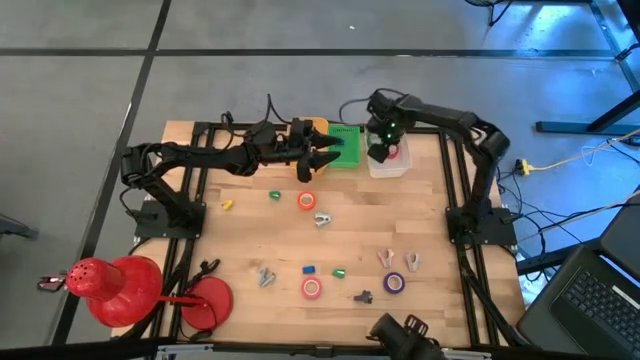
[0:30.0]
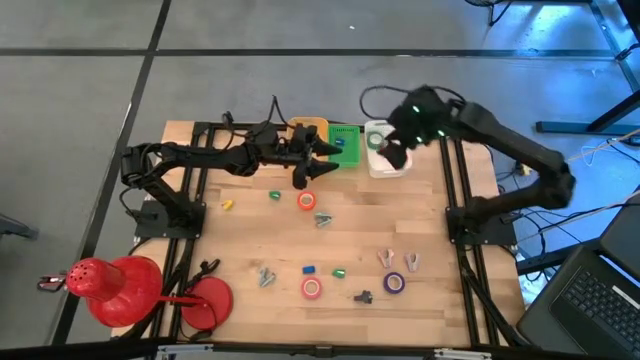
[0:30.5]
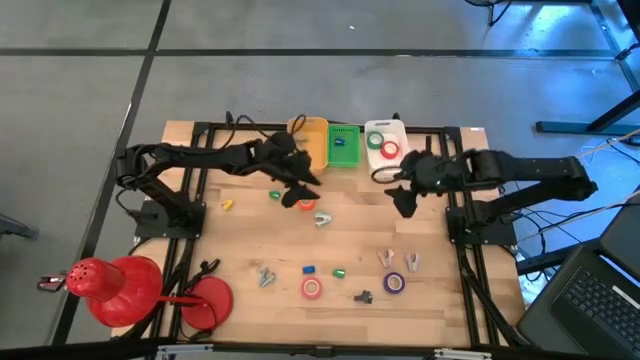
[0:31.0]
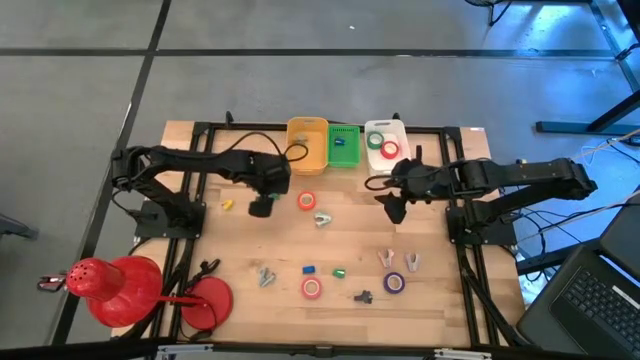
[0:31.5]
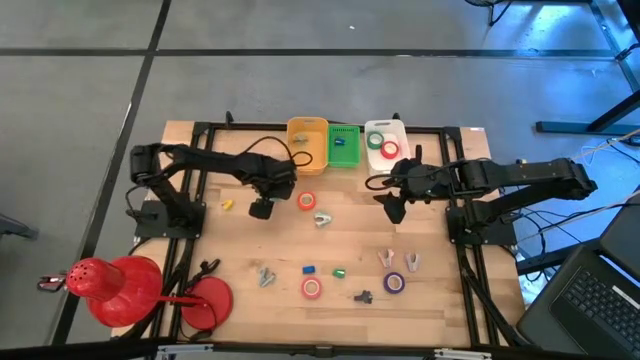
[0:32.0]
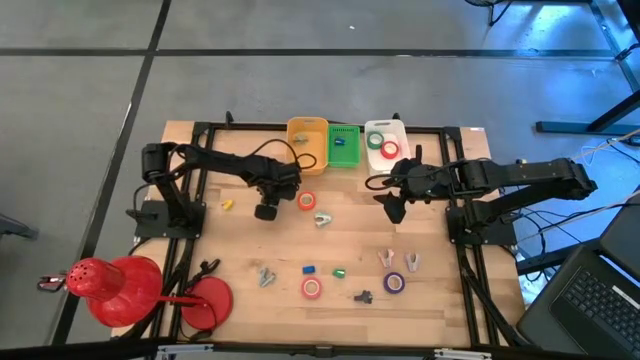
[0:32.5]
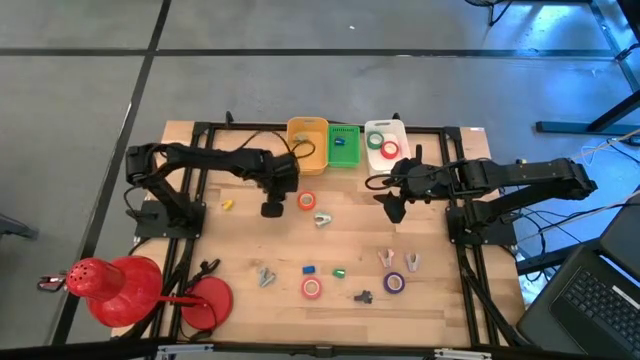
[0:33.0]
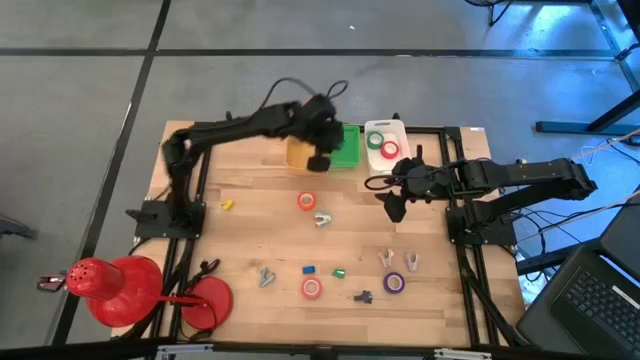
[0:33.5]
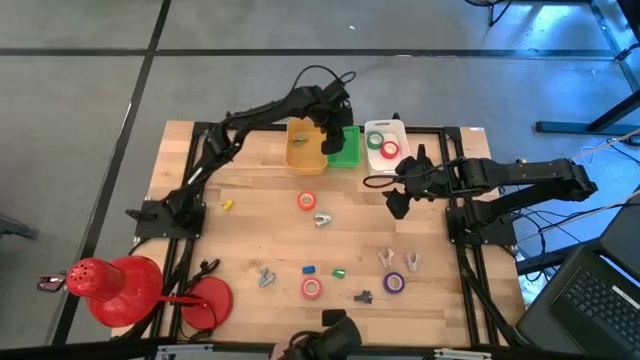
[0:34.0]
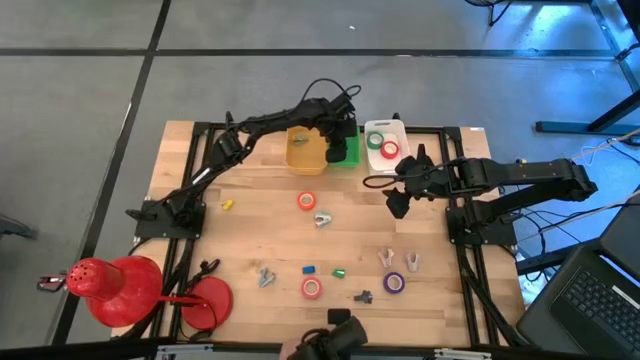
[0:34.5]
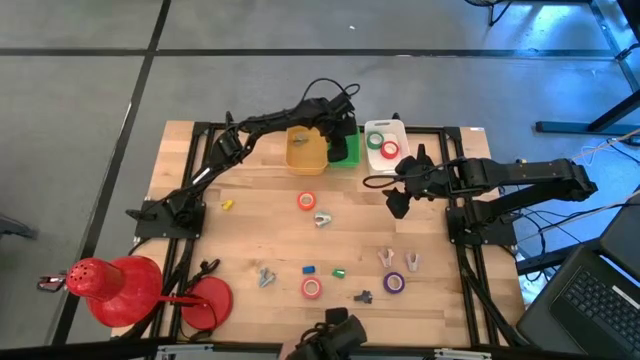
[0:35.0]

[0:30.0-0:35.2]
Task: Pick and place Stapler, Stapler remover, tape
Put the left green stapler into the green bin

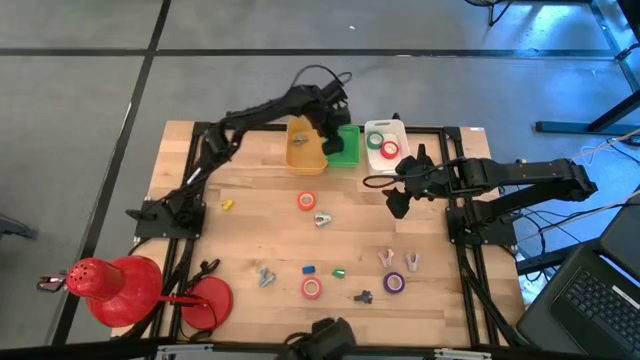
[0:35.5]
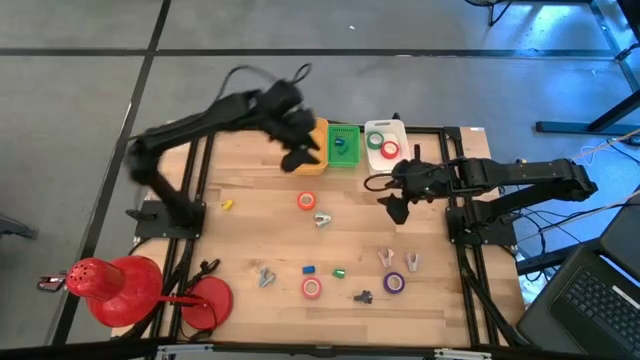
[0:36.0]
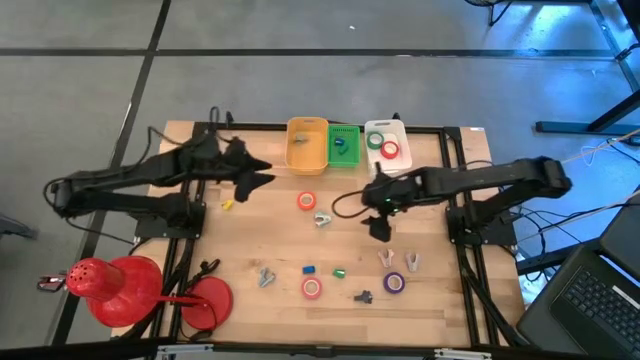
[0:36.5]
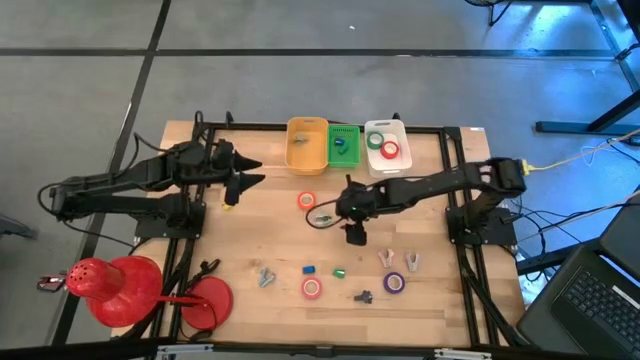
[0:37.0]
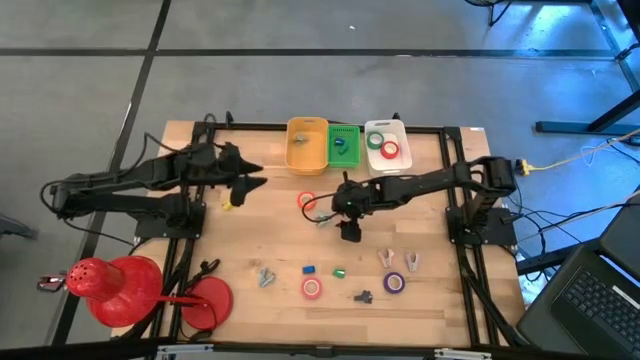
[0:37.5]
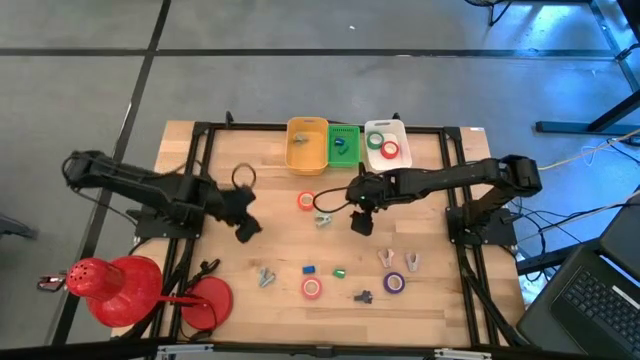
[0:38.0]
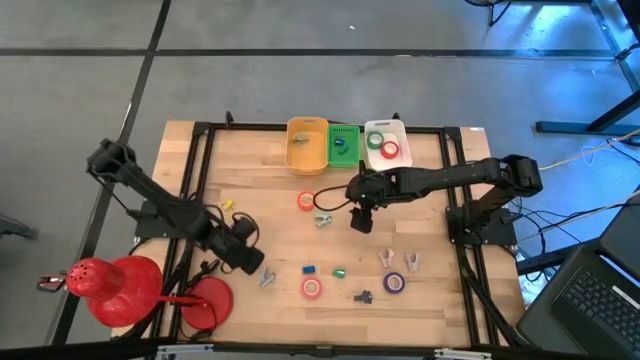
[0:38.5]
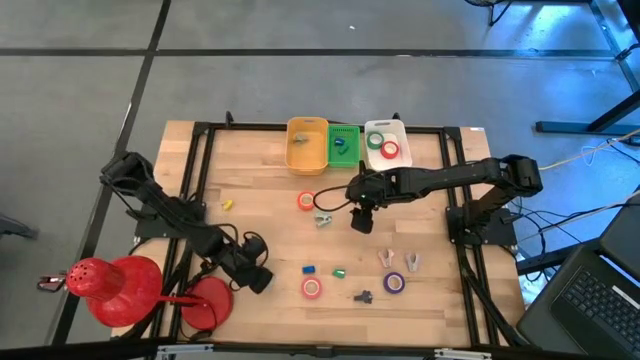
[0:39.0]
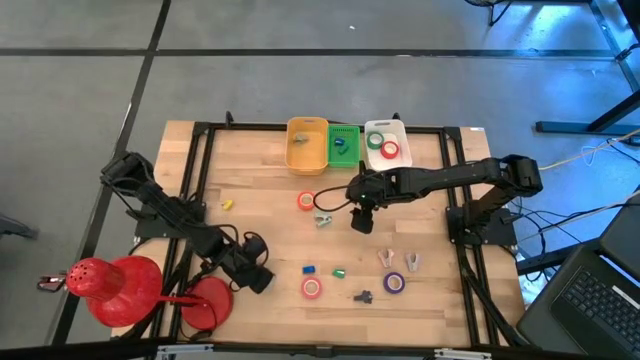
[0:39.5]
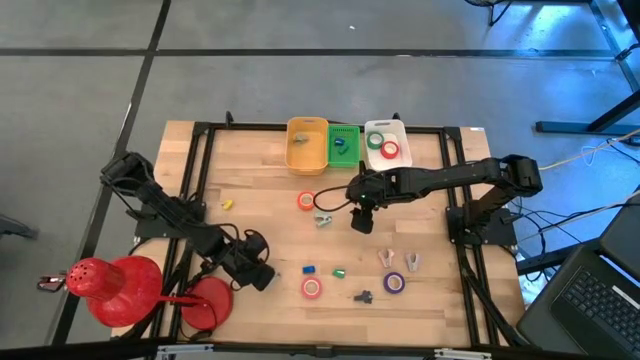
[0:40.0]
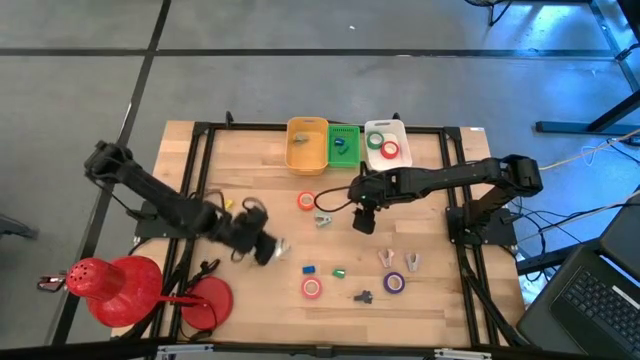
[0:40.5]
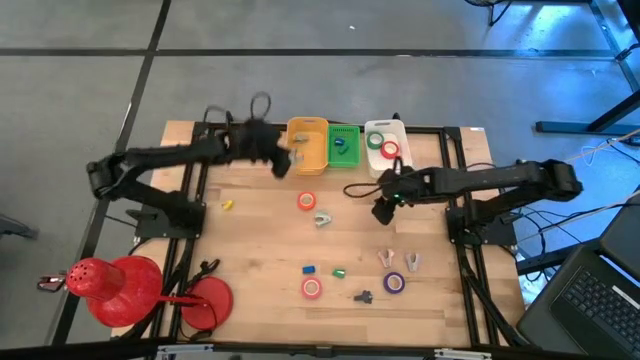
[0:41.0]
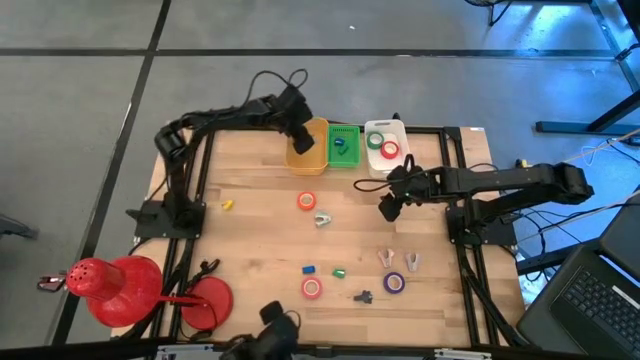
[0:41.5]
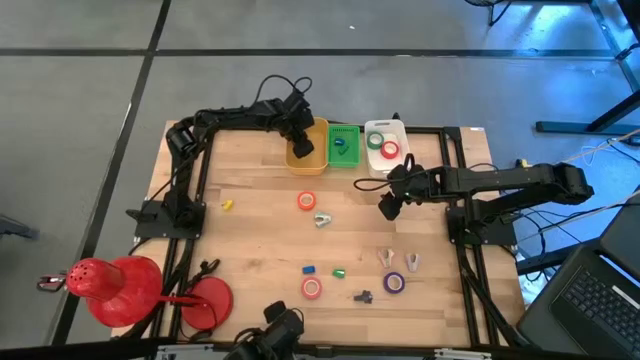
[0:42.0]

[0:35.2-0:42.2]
Put the gray staple remover into the yellow bin

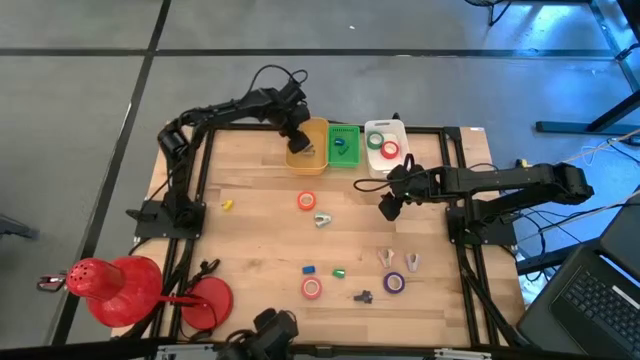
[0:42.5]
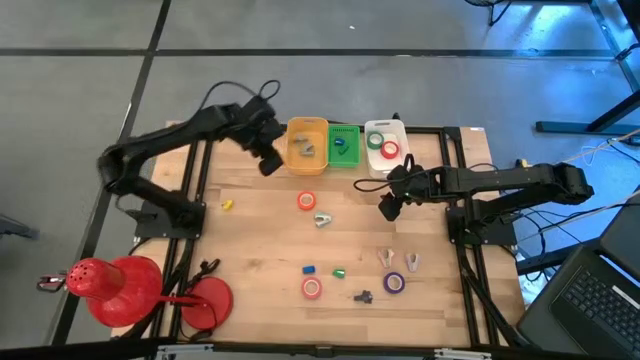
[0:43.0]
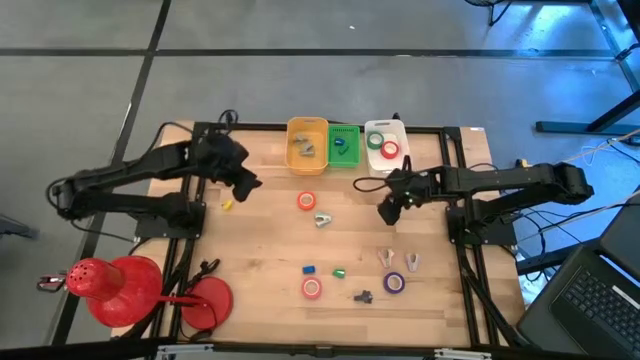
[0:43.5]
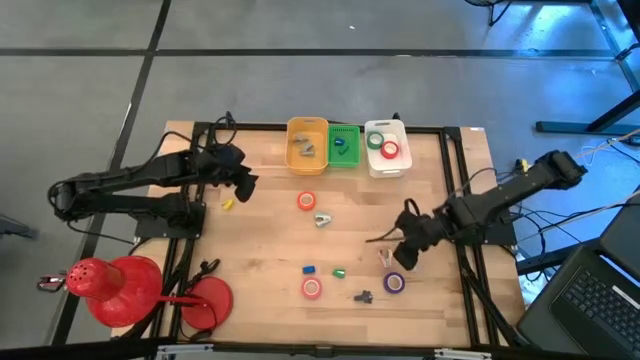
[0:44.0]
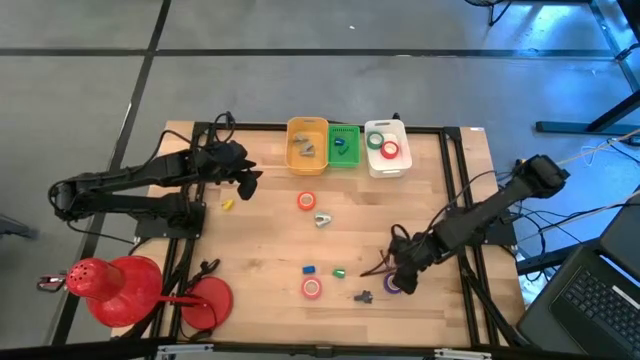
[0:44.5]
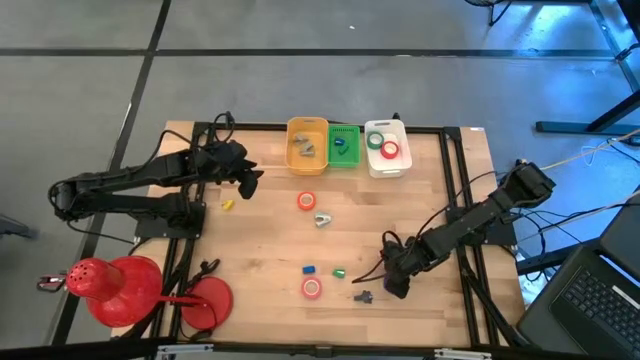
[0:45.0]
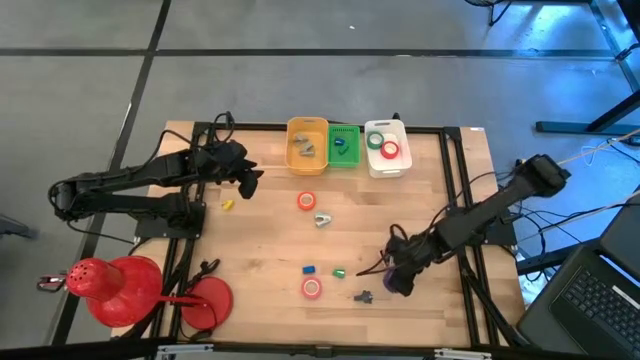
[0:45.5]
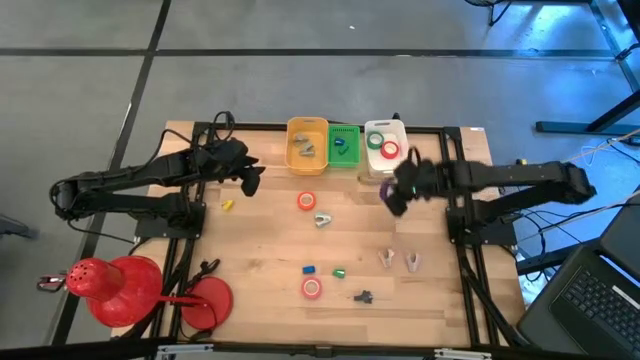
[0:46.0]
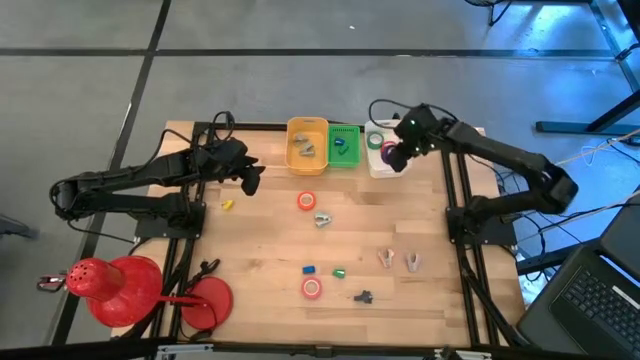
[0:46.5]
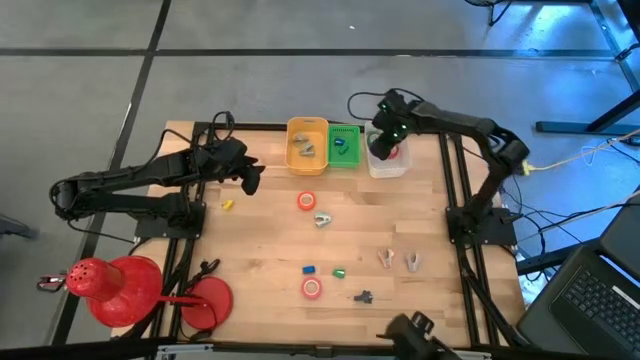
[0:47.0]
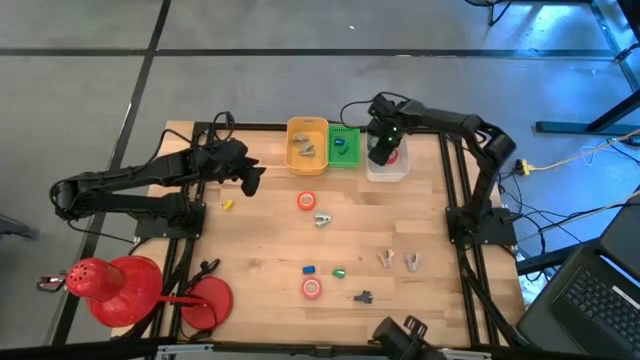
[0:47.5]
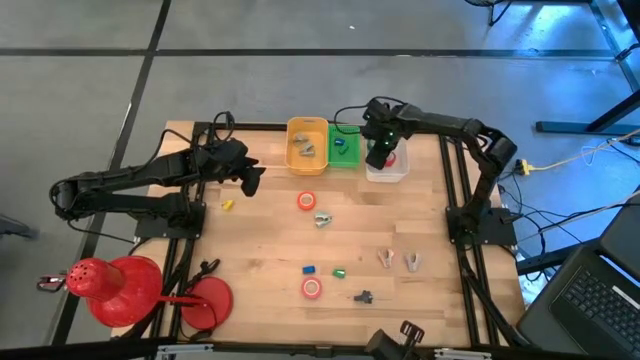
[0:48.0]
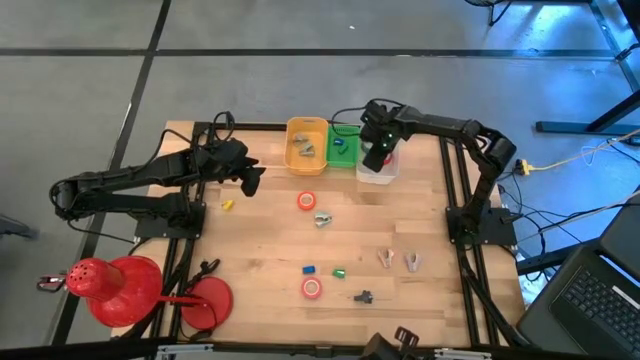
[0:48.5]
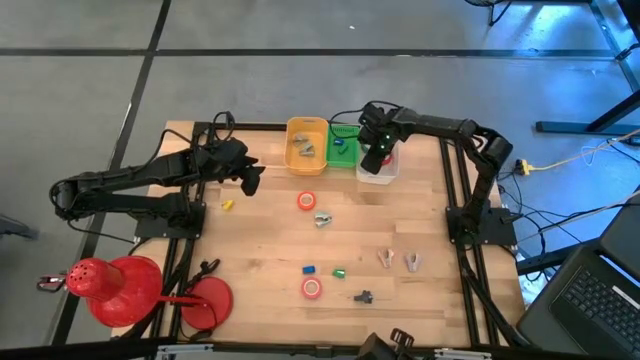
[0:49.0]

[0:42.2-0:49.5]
Put the blue tape into the white bin

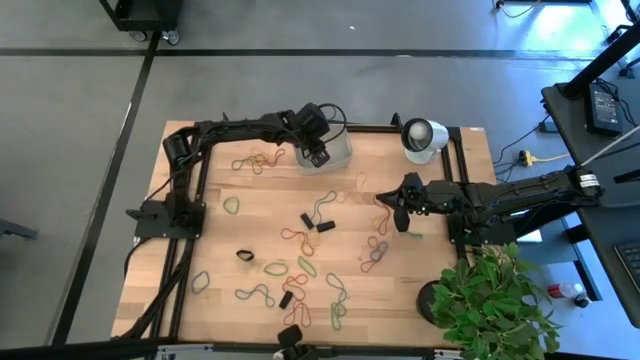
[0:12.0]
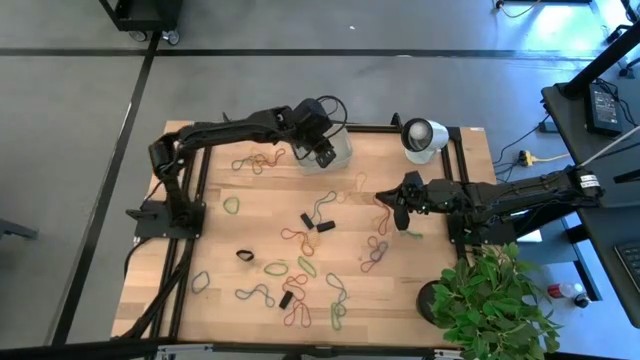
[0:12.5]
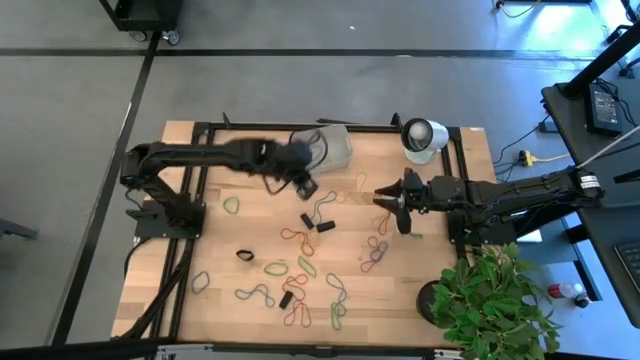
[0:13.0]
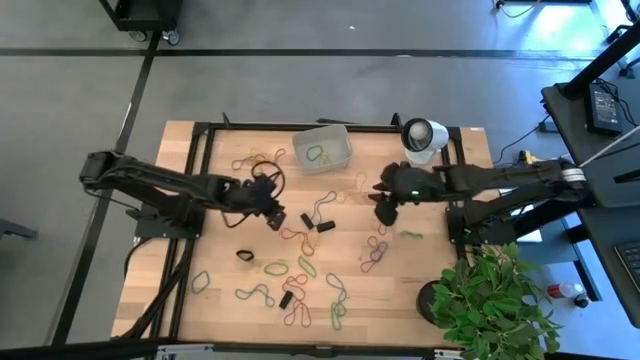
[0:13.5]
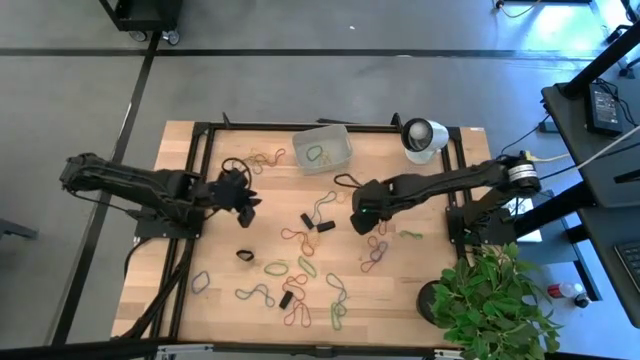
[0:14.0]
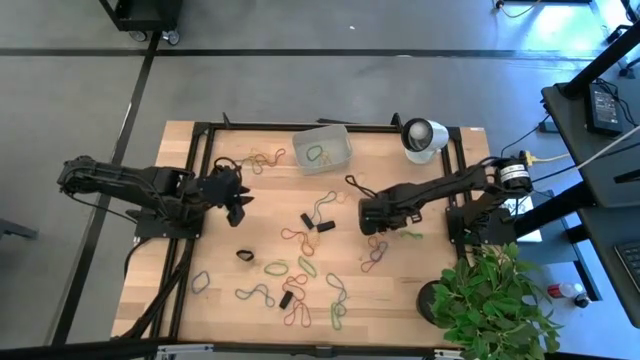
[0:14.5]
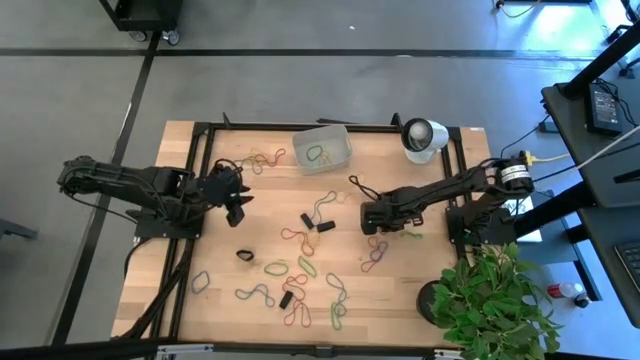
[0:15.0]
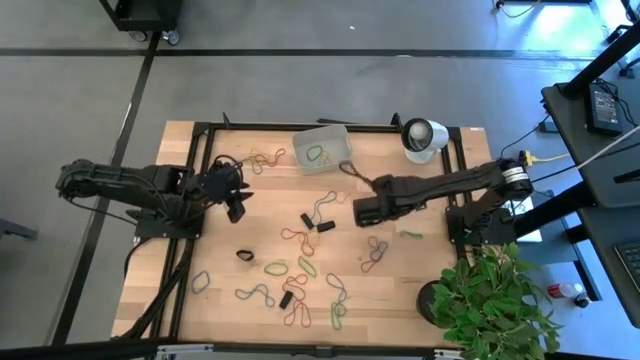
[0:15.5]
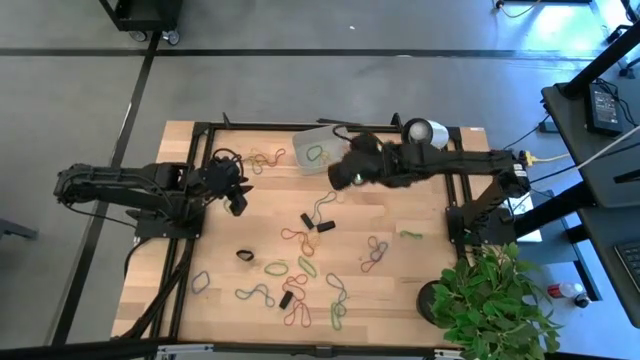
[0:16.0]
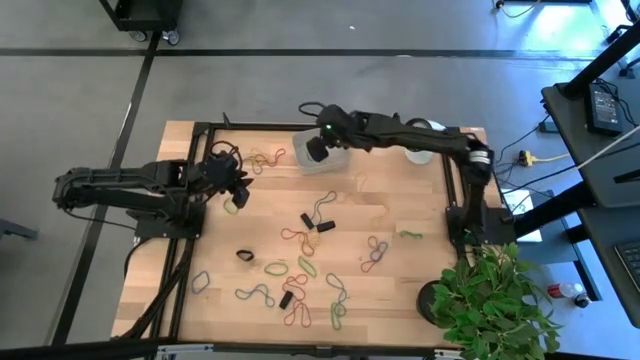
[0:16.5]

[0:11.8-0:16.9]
Task: Pick and place rubber bands into bin
Put the red rubber band into the gray bin
